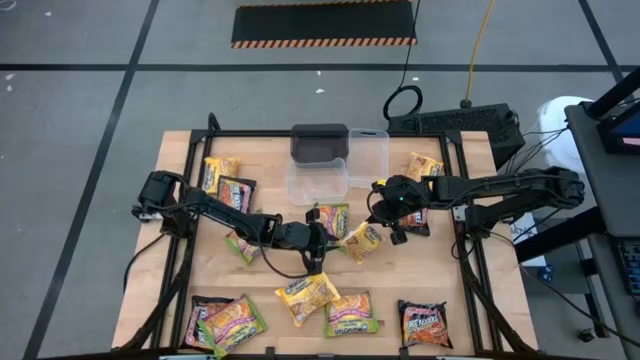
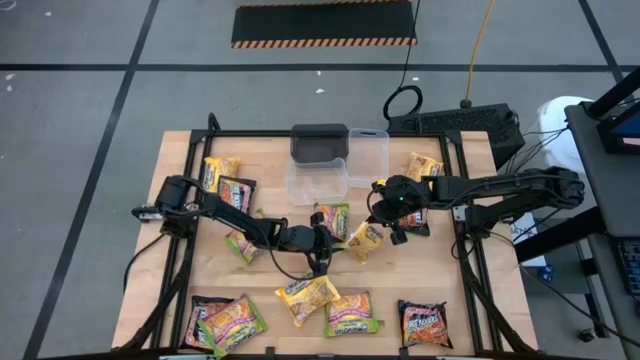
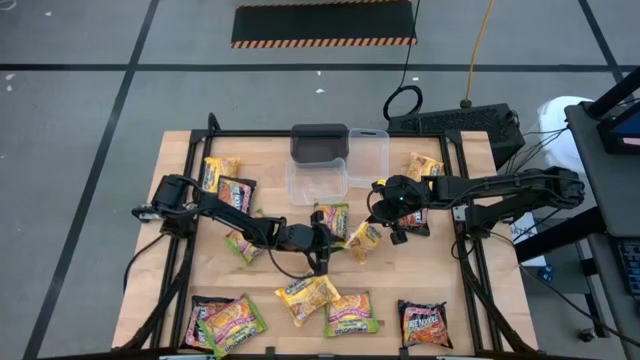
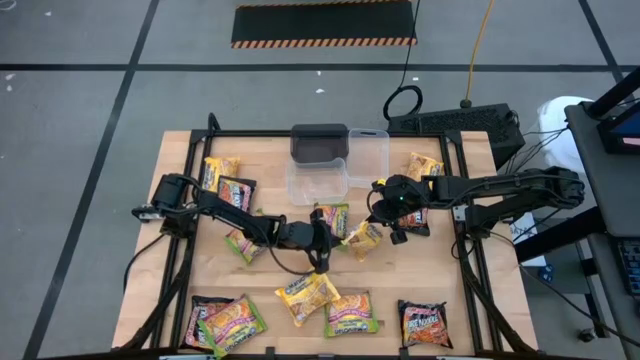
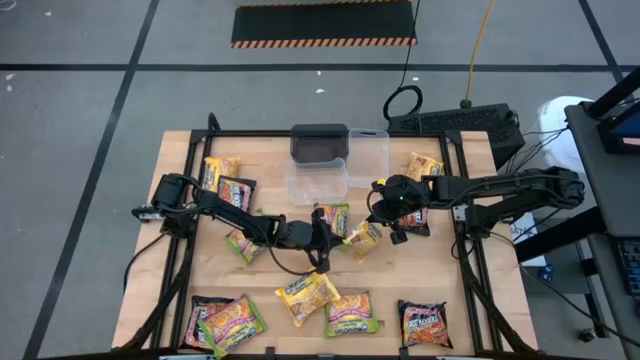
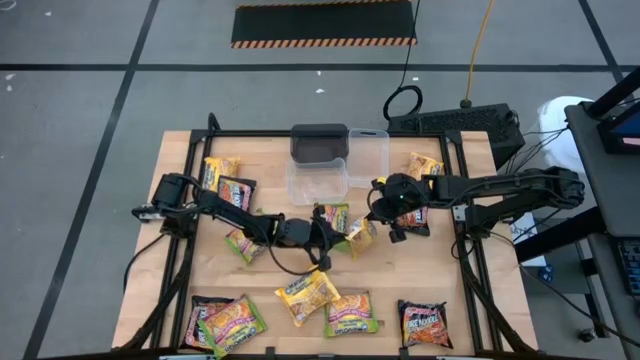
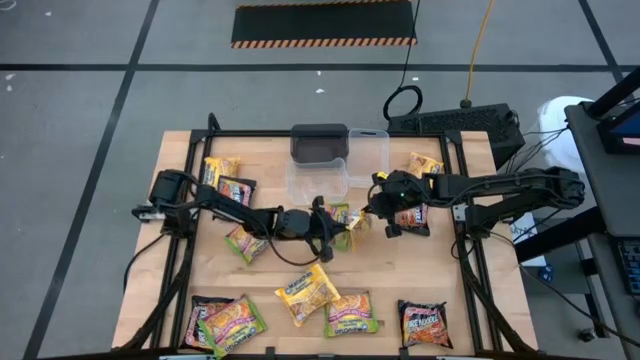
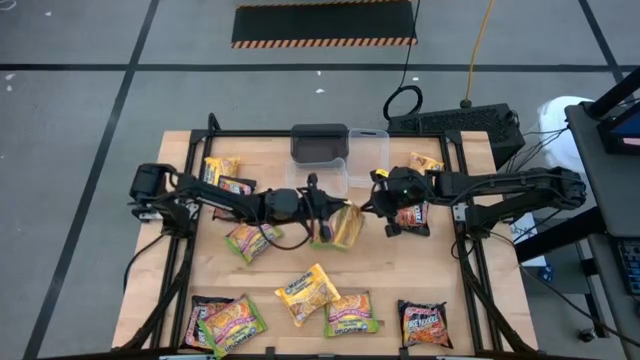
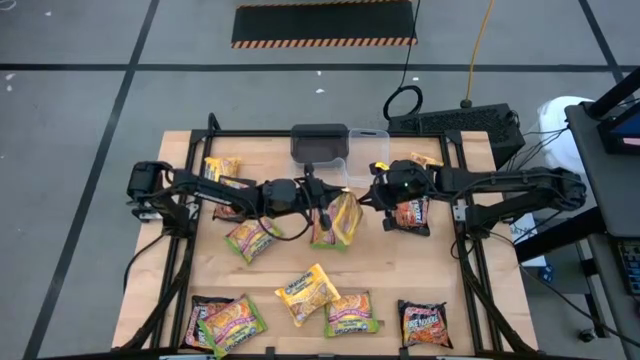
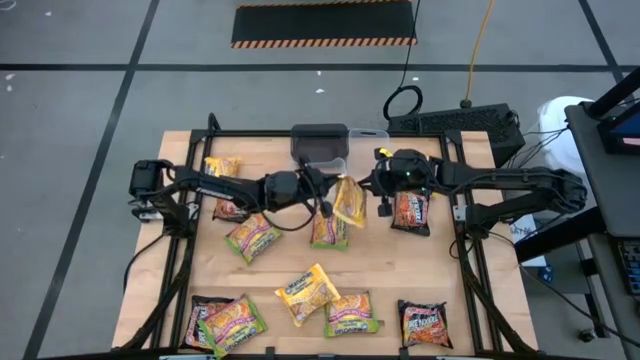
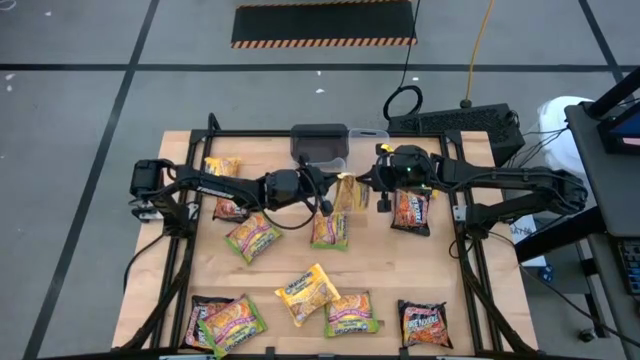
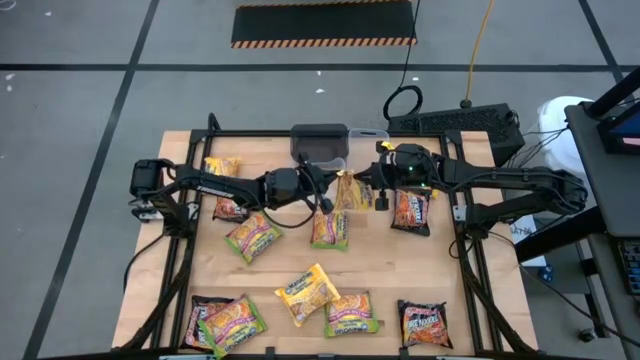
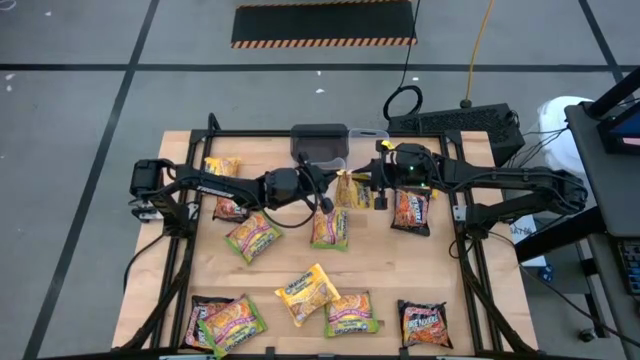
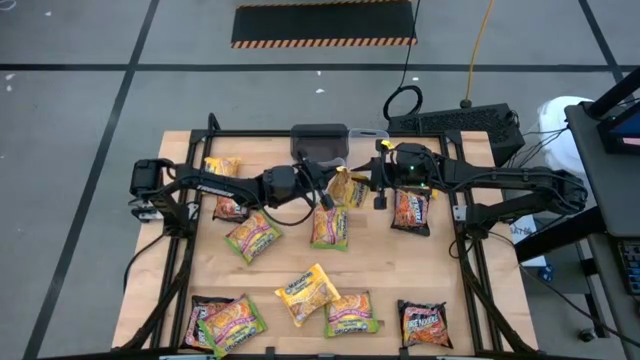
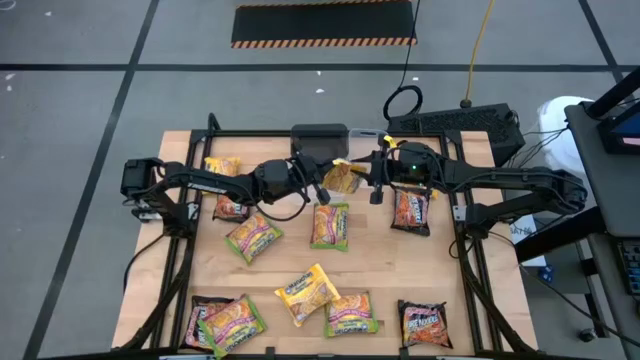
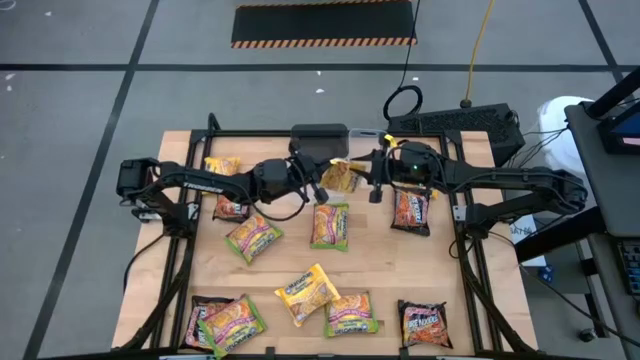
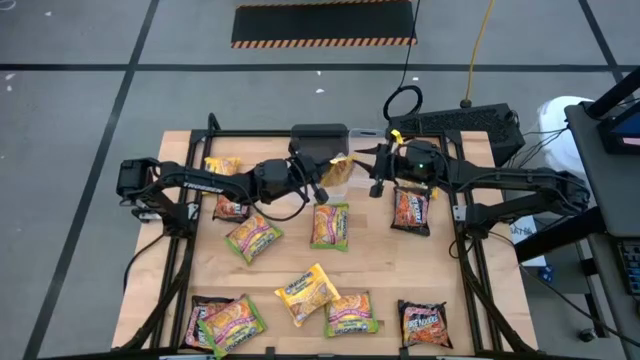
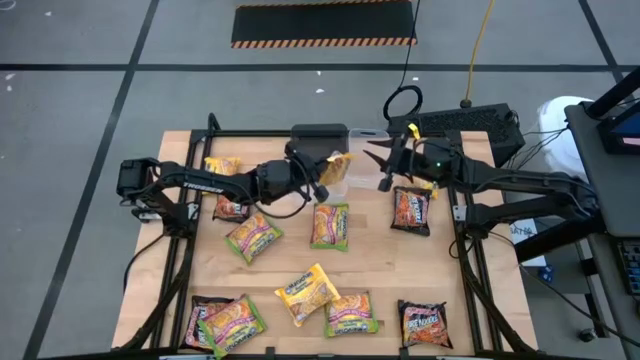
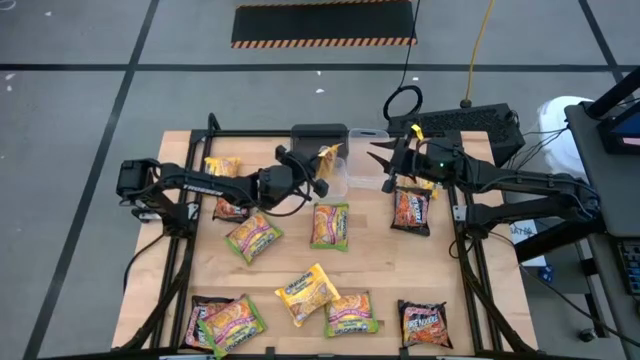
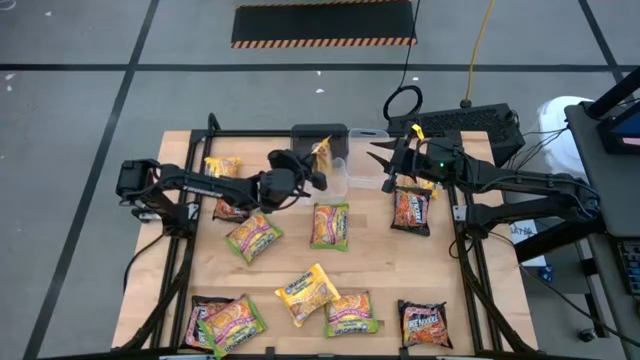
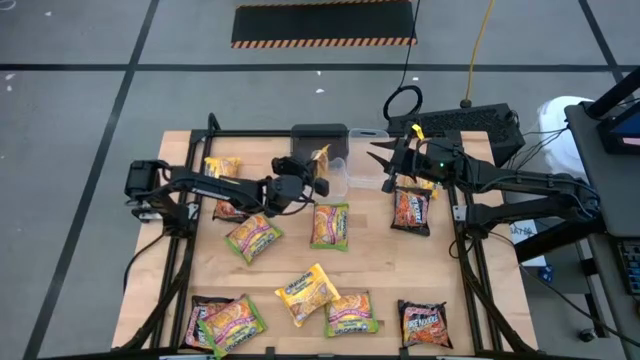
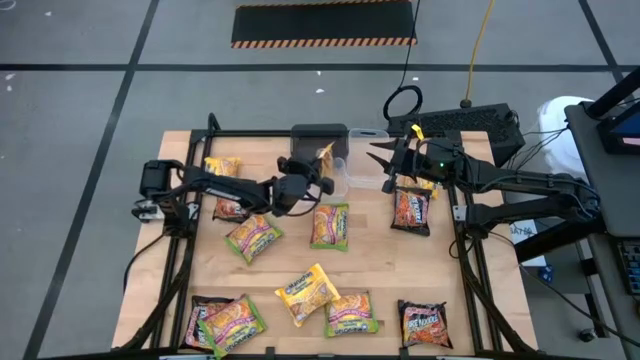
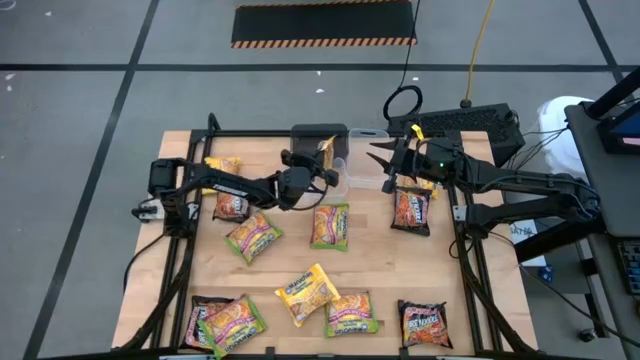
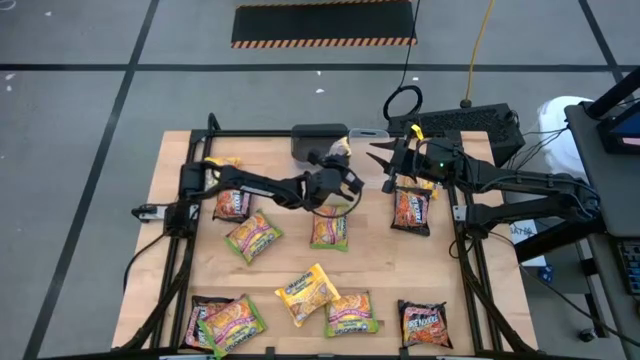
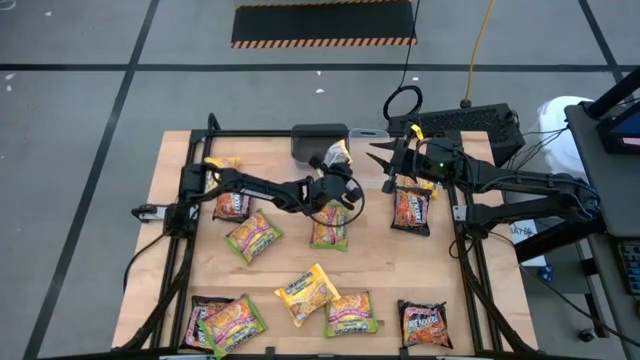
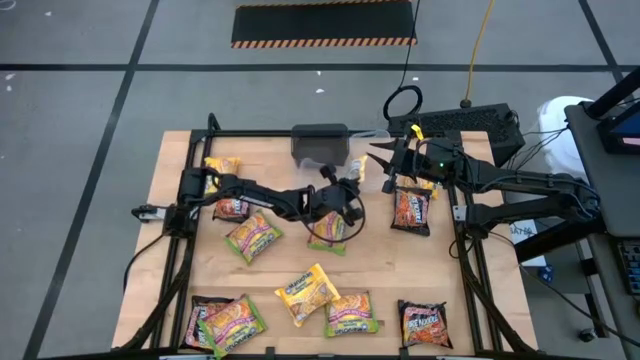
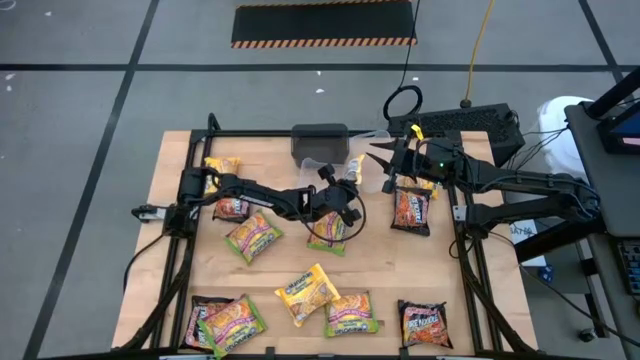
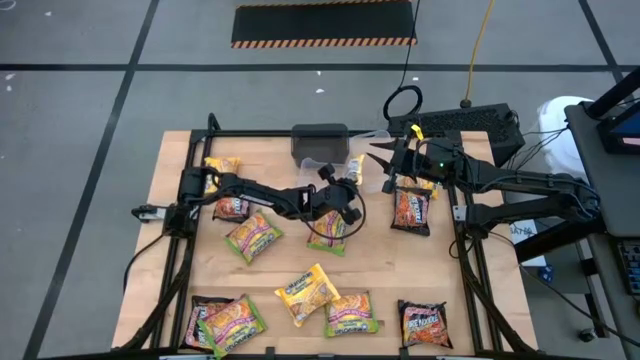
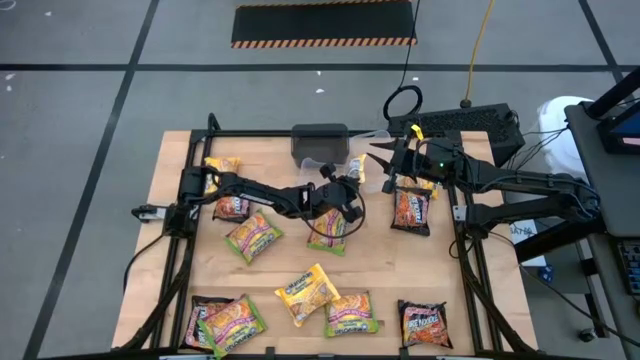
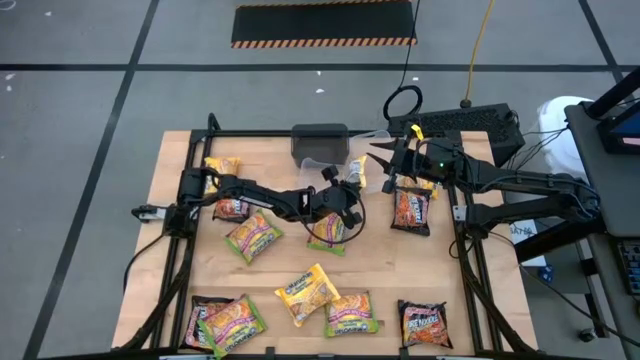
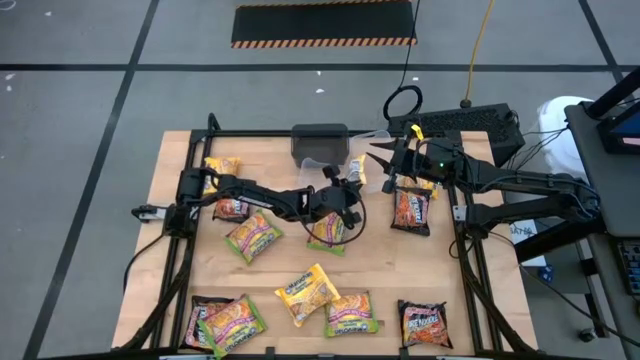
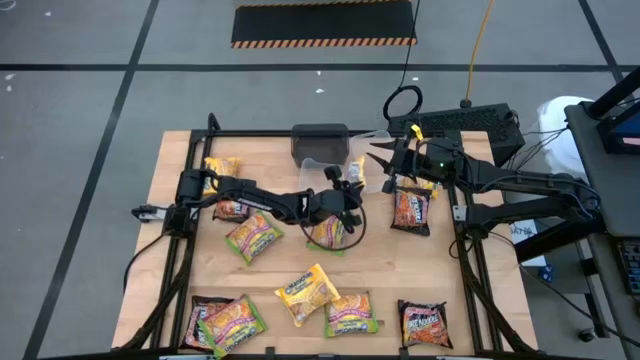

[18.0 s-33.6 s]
Task: Sort Maruchan noodles
Put the yellow noodle pack into the left transparent bin
